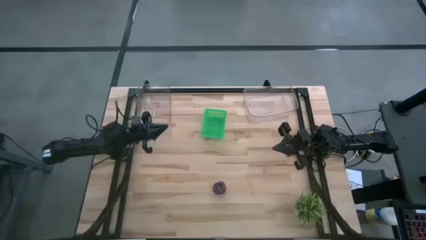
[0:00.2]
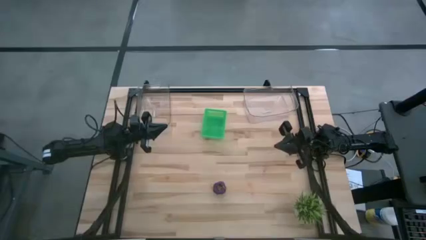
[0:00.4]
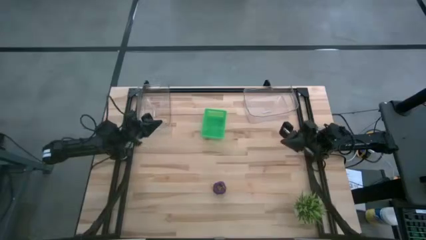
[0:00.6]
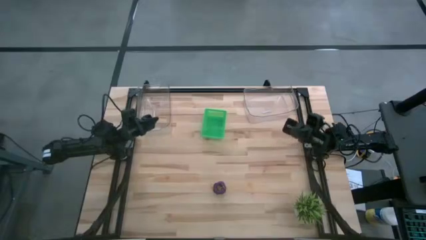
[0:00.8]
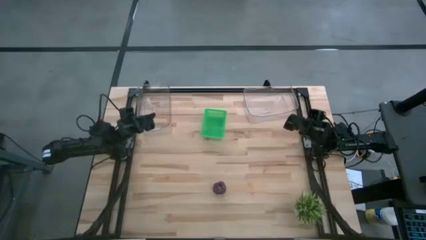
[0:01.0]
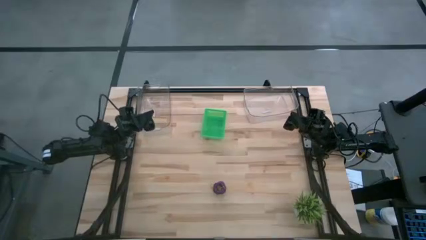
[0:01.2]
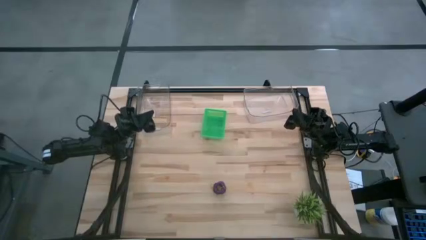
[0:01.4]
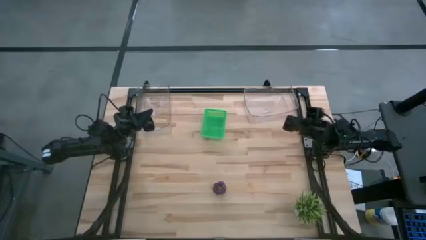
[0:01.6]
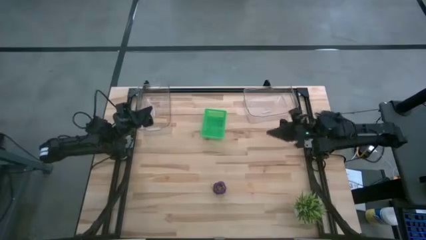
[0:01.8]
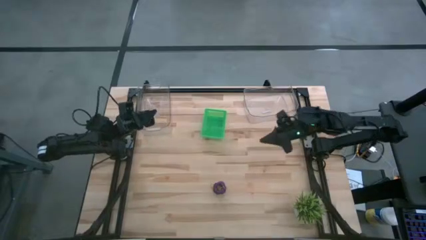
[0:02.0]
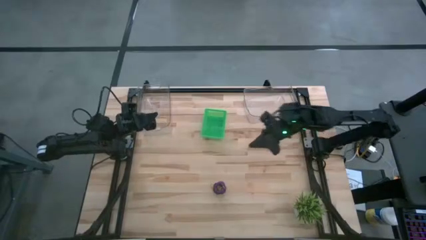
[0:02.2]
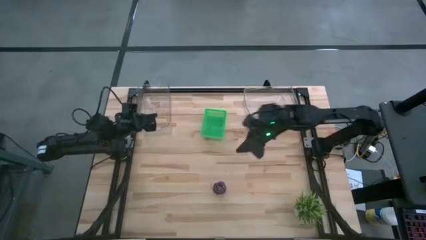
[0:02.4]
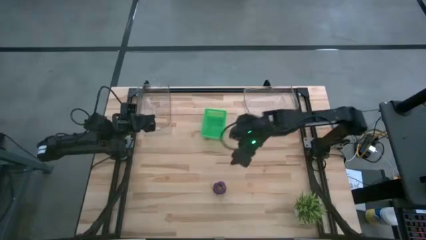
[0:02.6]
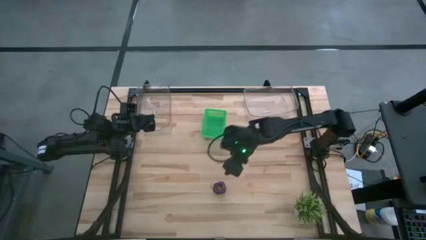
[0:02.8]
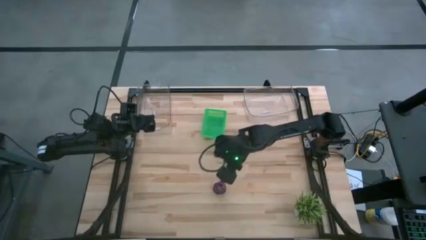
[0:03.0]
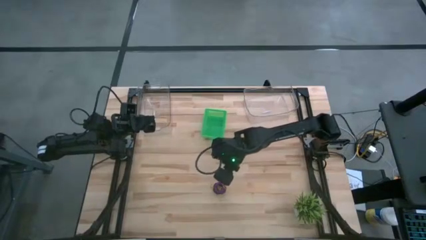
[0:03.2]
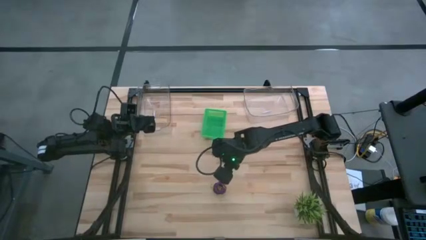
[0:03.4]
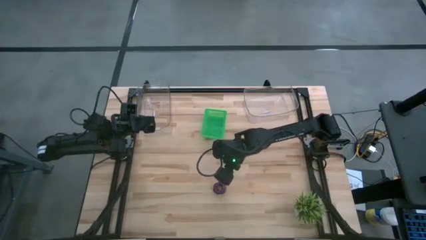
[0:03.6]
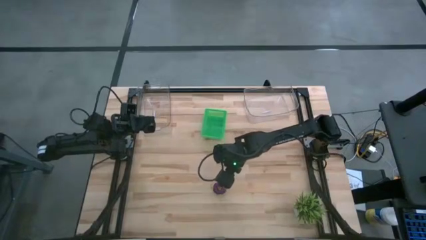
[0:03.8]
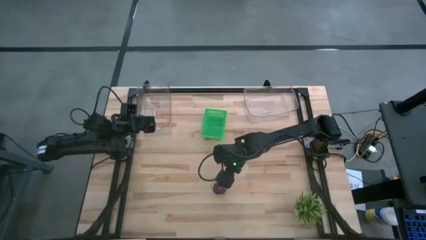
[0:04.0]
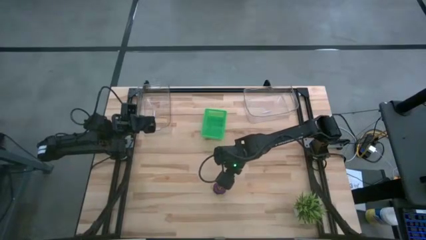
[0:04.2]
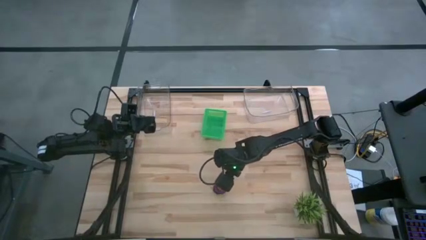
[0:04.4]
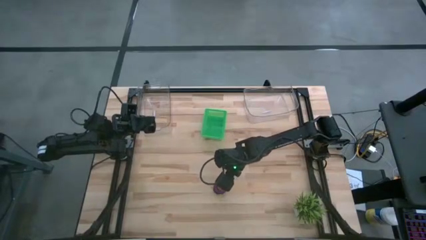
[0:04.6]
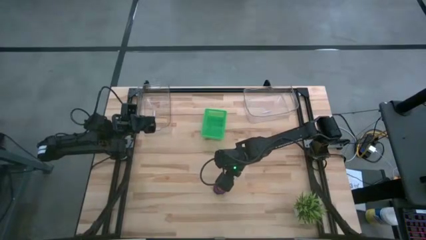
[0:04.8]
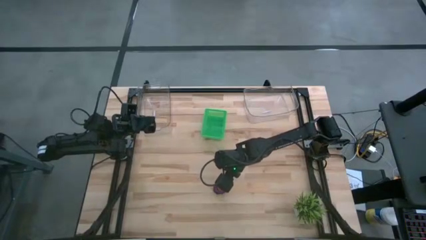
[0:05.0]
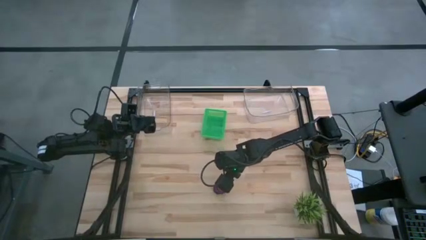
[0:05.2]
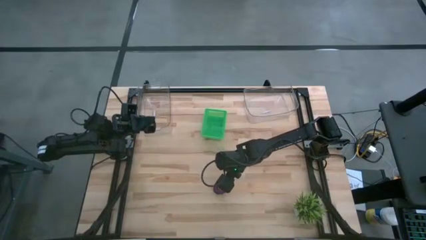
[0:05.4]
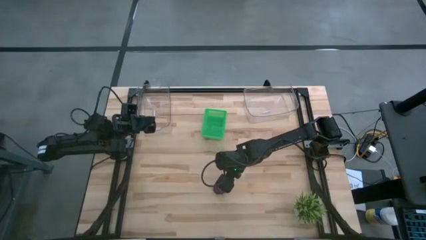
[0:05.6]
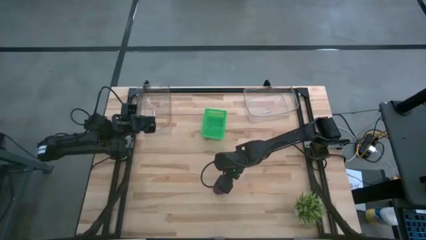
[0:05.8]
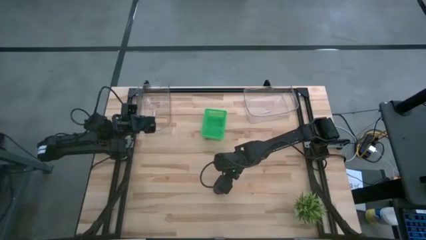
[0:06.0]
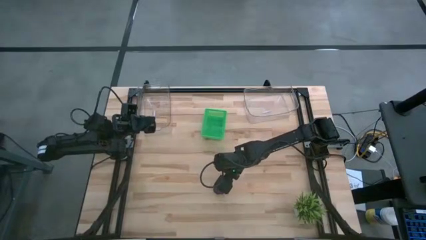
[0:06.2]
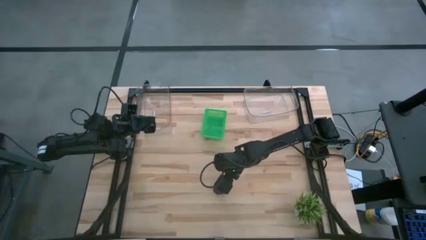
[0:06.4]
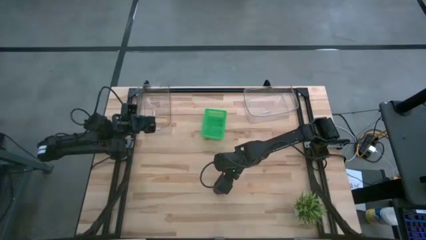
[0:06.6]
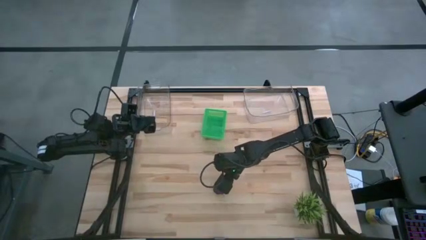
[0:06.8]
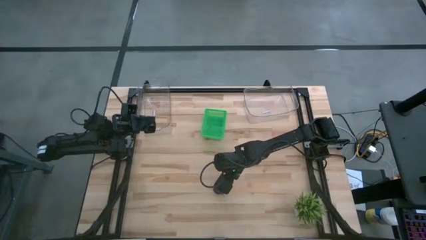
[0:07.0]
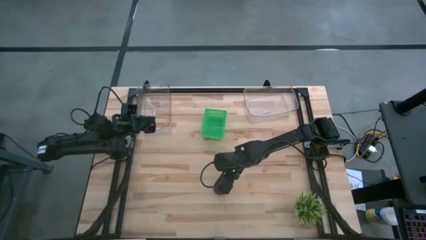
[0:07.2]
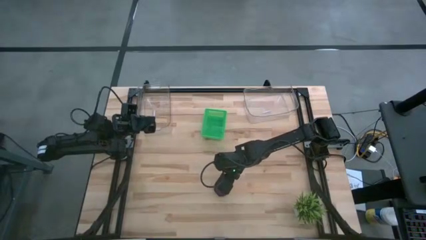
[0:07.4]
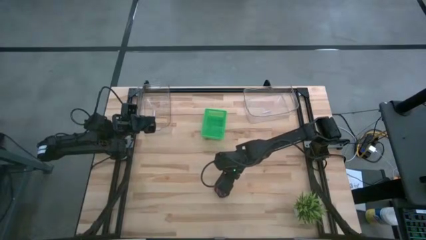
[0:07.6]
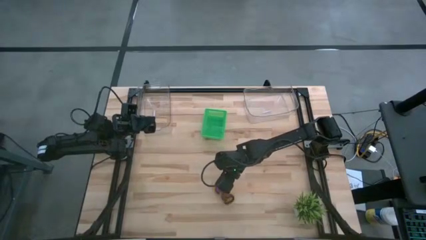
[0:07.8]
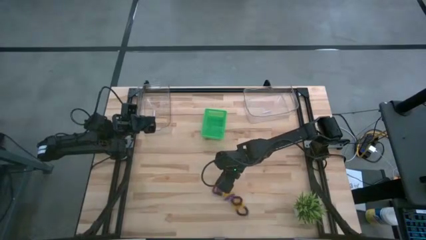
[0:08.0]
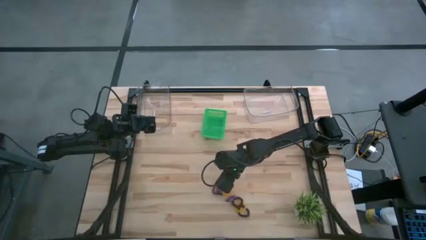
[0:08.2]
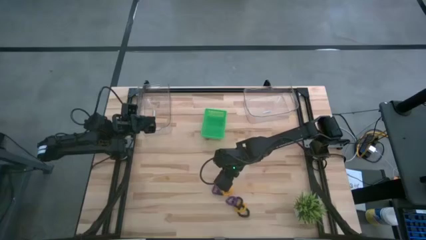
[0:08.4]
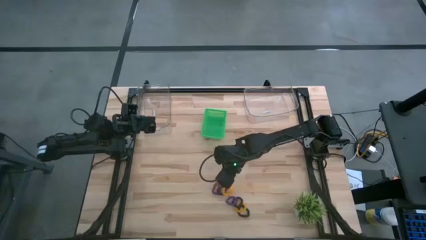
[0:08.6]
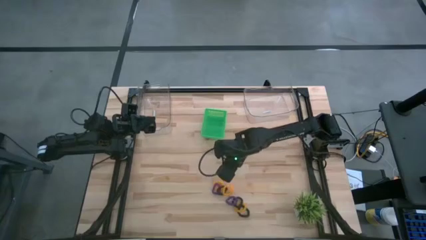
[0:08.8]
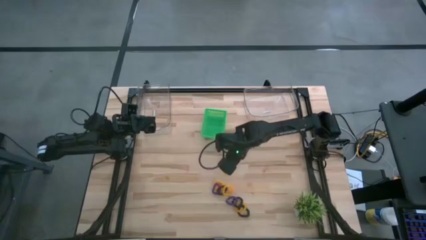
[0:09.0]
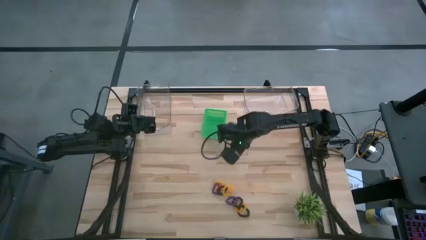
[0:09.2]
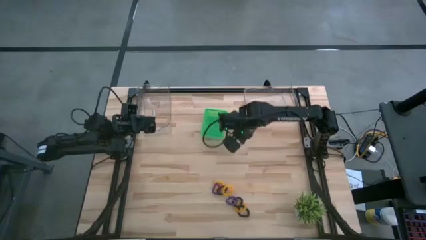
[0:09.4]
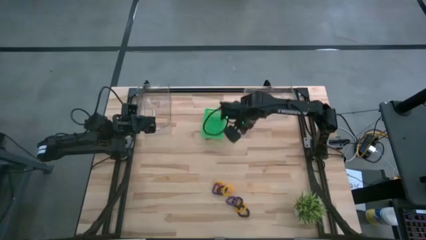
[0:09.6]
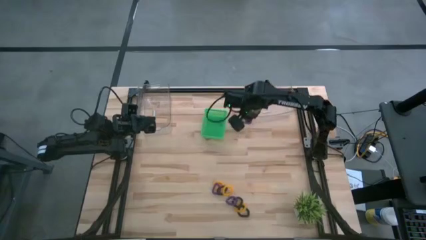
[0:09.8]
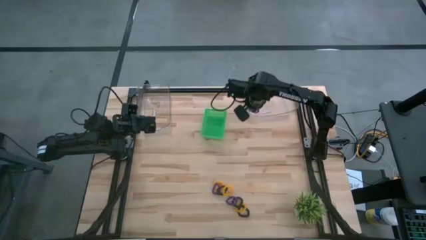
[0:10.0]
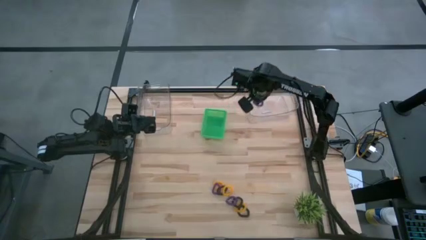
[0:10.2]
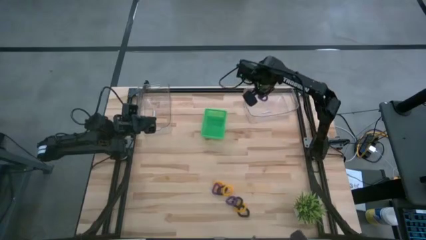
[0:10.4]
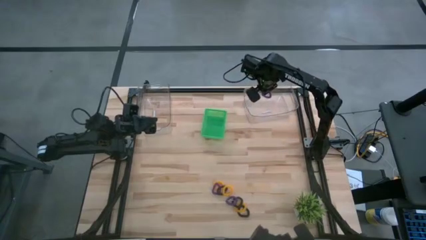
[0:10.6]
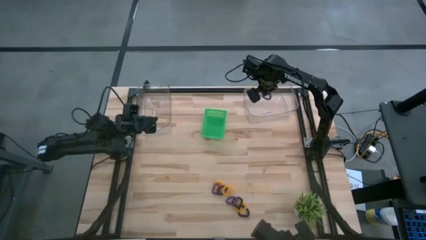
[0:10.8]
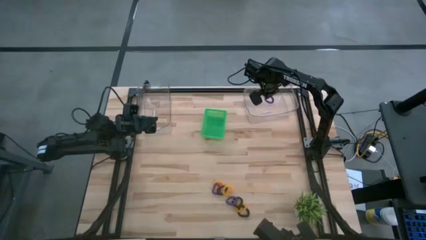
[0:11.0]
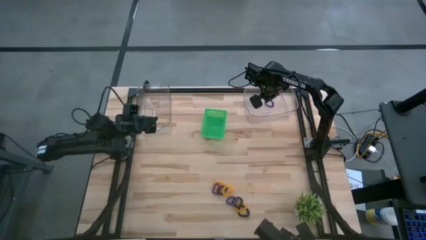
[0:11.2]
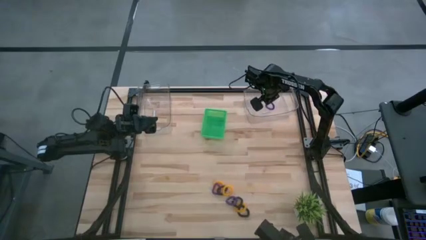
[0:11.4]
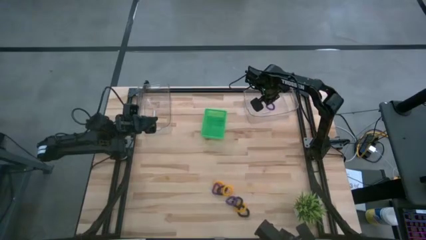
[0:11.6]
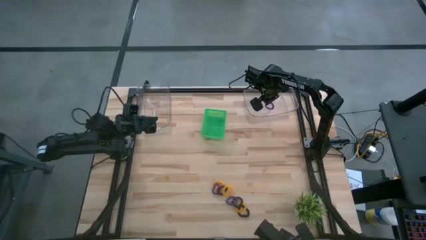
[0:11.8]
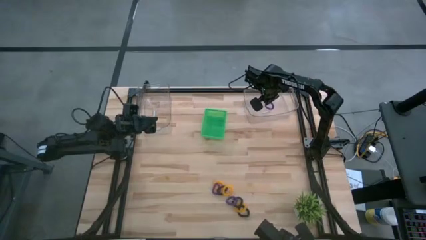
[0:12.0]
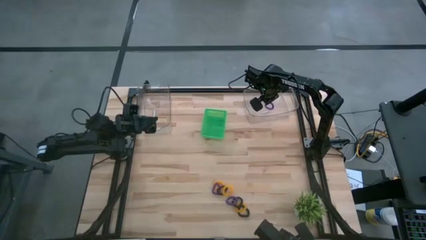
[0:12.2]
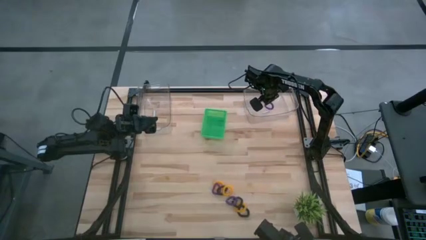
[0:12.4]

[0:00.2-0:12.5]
Task: Sort spring keychains
Put the top purple spring keychain into the right transparent bin
